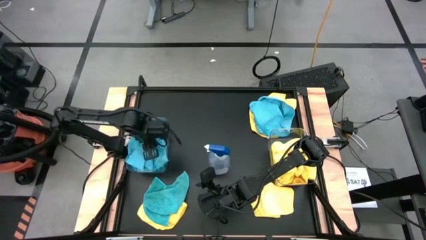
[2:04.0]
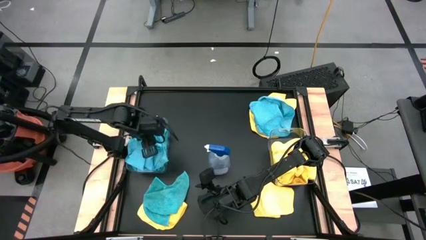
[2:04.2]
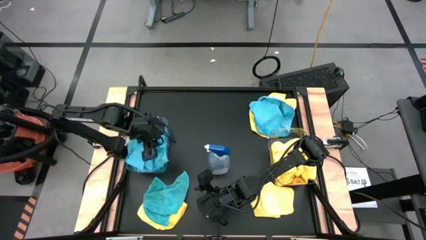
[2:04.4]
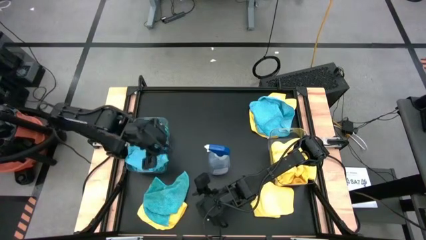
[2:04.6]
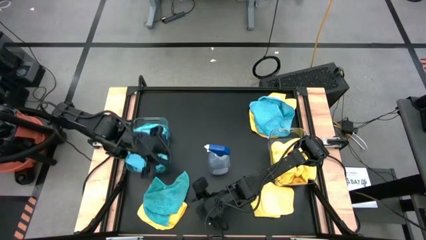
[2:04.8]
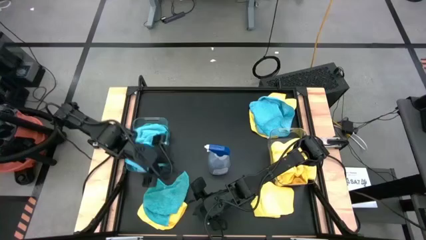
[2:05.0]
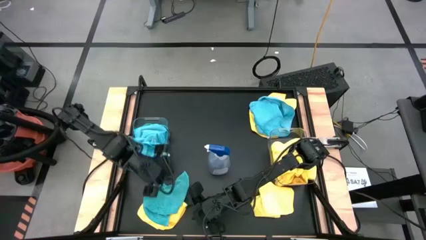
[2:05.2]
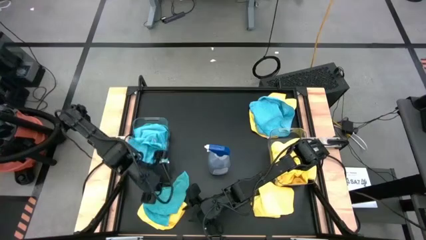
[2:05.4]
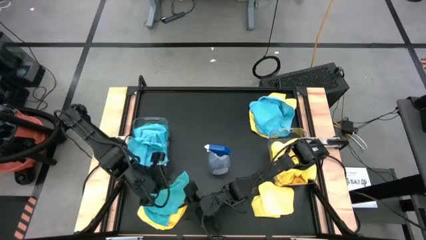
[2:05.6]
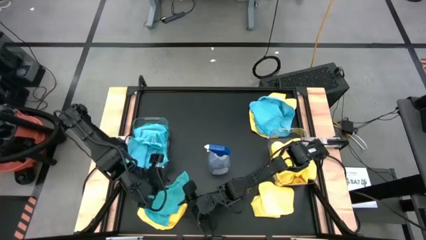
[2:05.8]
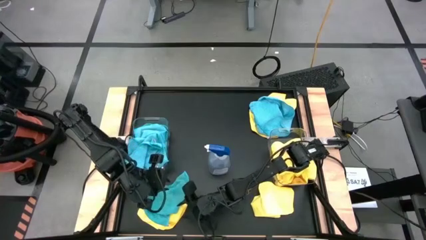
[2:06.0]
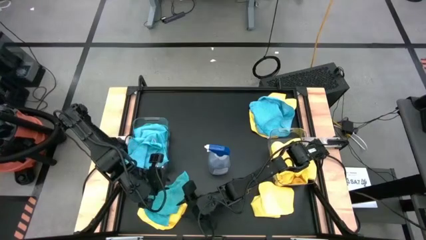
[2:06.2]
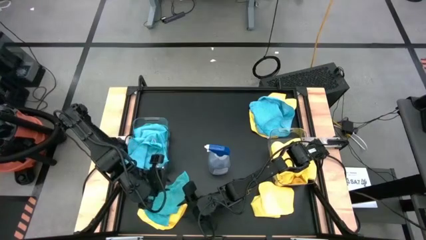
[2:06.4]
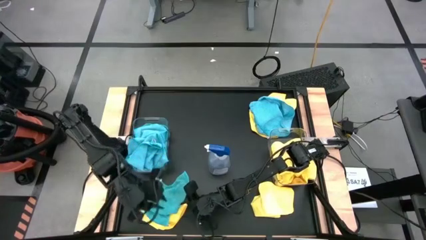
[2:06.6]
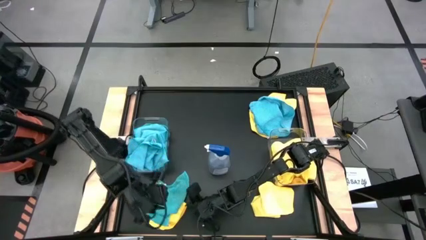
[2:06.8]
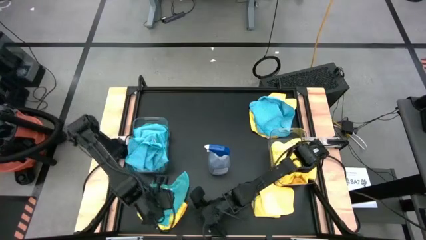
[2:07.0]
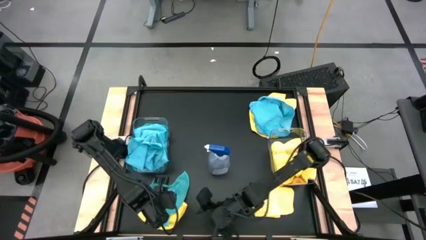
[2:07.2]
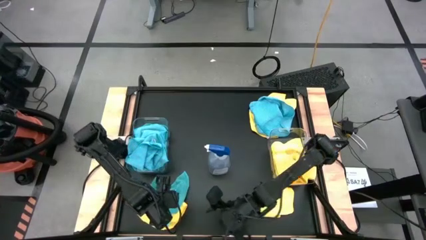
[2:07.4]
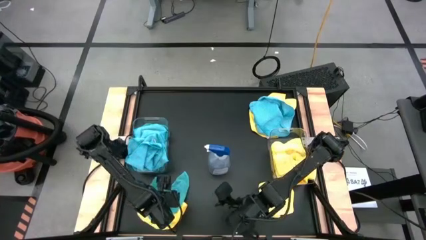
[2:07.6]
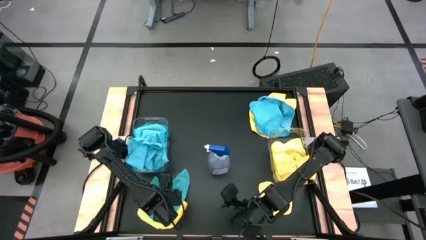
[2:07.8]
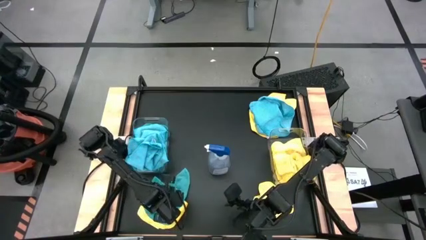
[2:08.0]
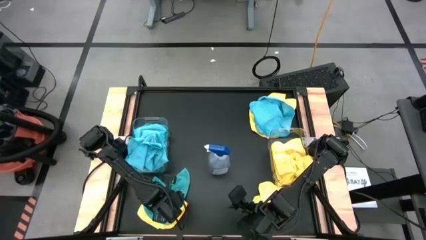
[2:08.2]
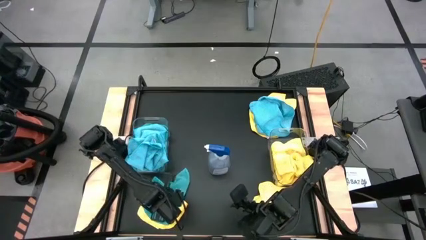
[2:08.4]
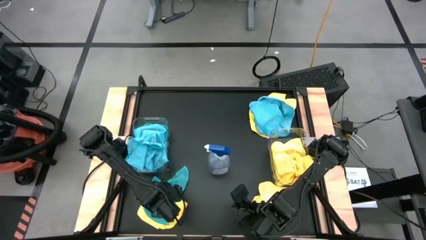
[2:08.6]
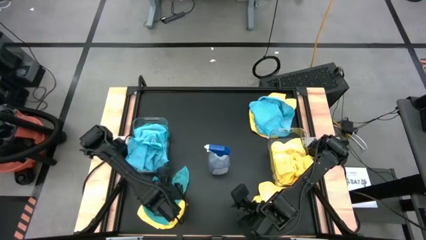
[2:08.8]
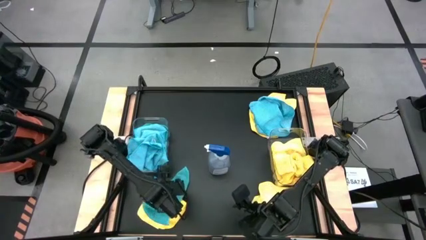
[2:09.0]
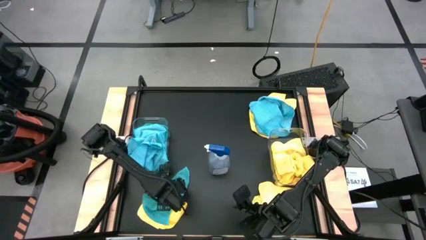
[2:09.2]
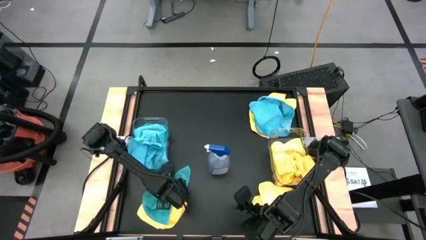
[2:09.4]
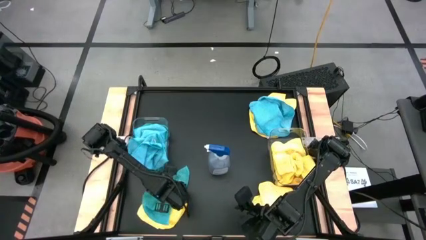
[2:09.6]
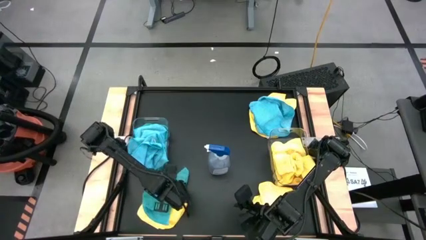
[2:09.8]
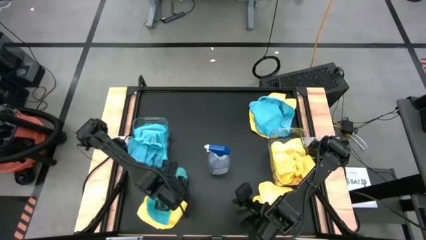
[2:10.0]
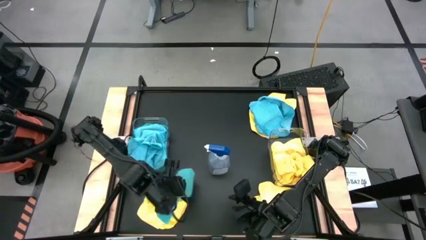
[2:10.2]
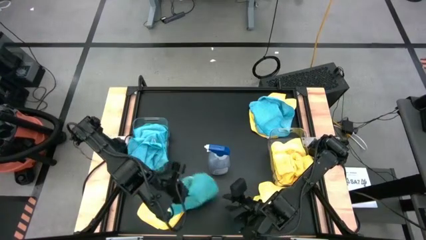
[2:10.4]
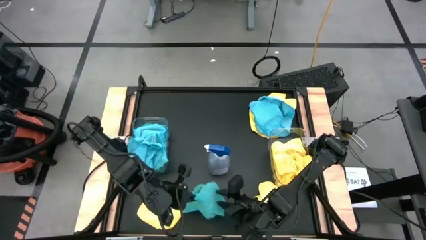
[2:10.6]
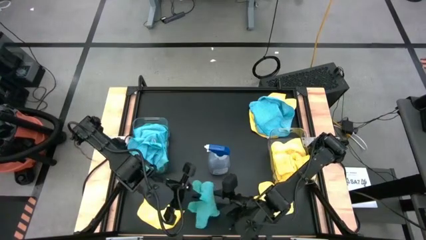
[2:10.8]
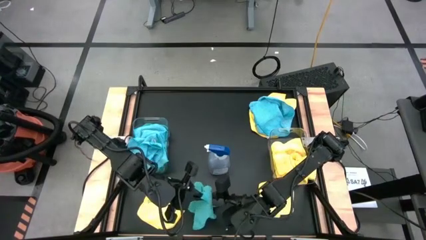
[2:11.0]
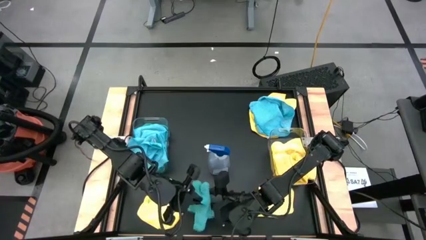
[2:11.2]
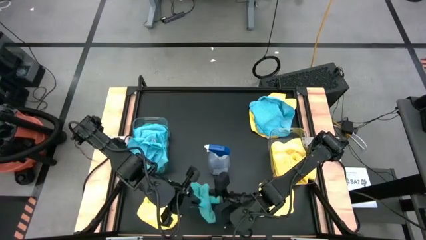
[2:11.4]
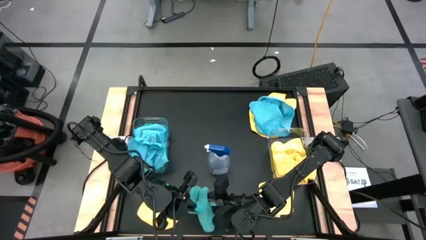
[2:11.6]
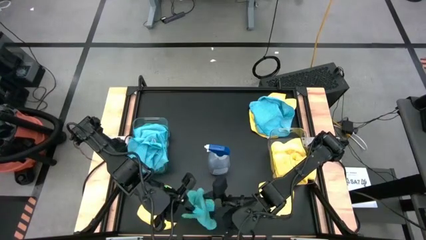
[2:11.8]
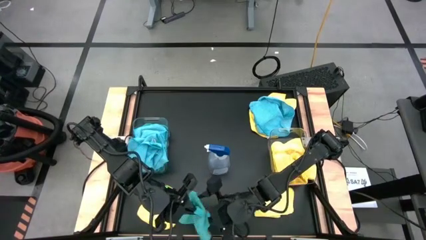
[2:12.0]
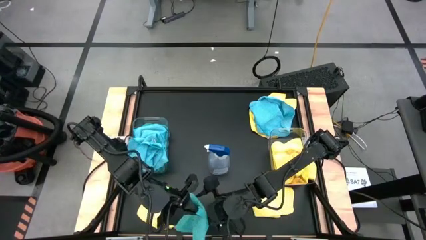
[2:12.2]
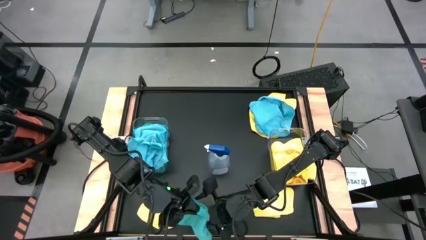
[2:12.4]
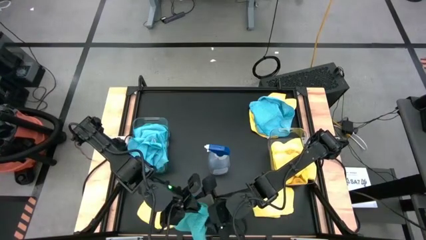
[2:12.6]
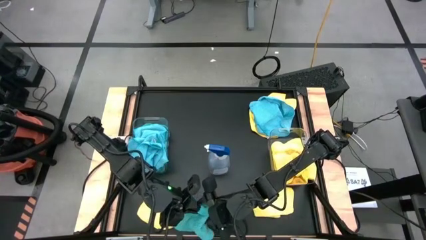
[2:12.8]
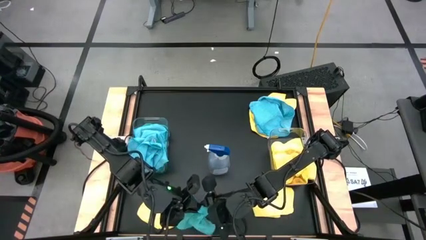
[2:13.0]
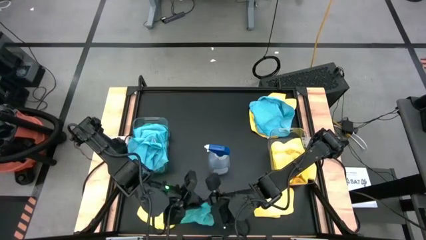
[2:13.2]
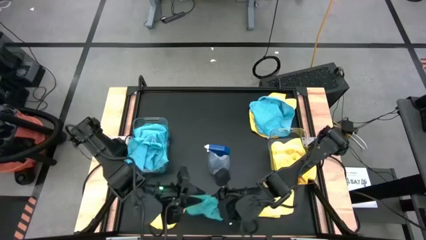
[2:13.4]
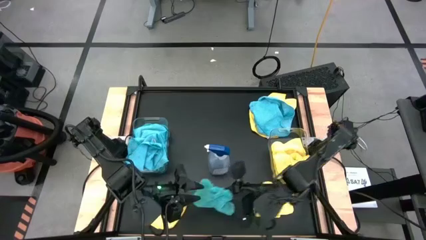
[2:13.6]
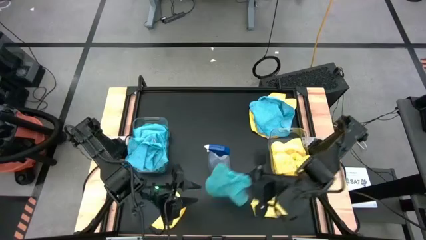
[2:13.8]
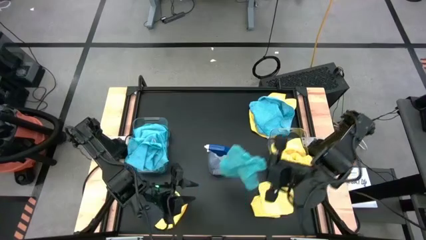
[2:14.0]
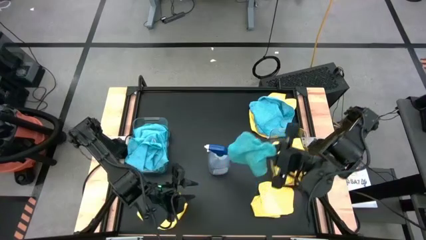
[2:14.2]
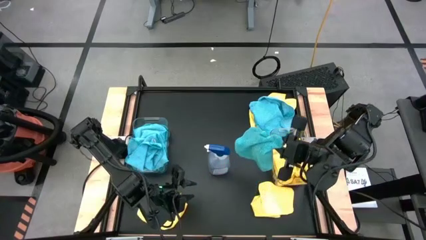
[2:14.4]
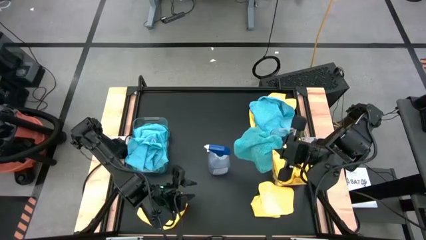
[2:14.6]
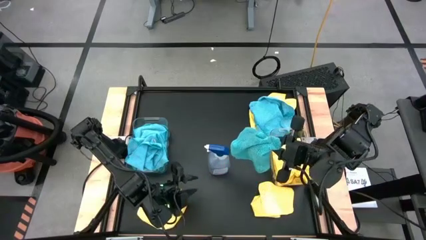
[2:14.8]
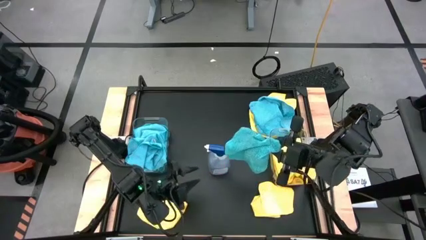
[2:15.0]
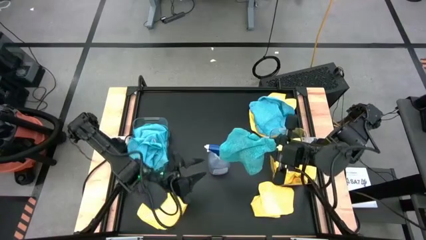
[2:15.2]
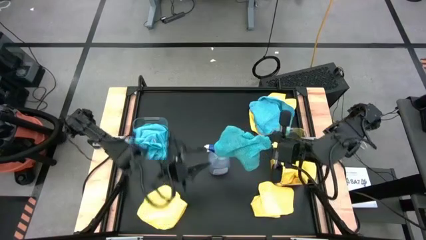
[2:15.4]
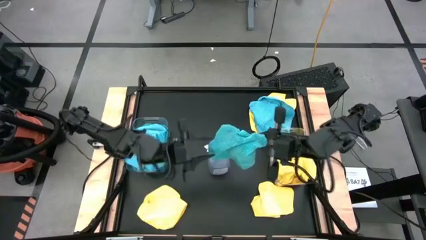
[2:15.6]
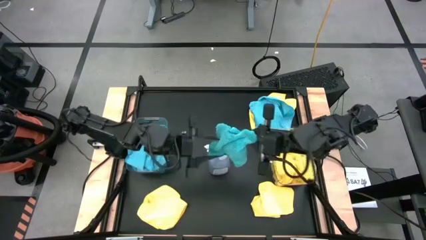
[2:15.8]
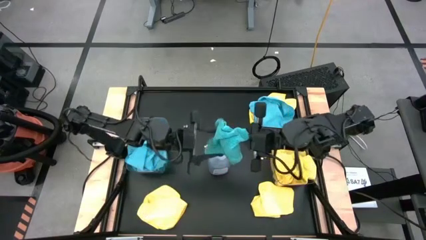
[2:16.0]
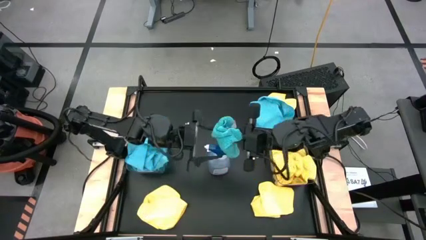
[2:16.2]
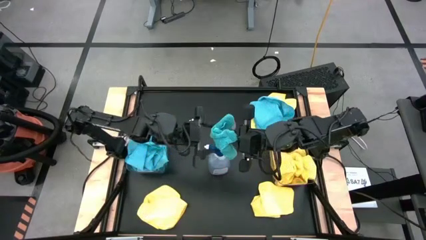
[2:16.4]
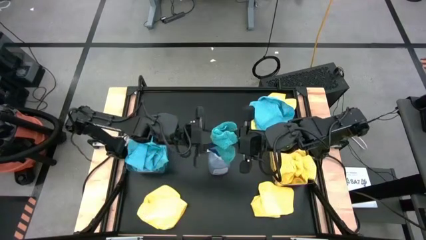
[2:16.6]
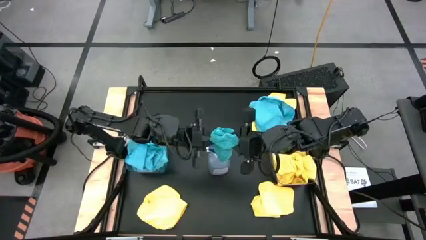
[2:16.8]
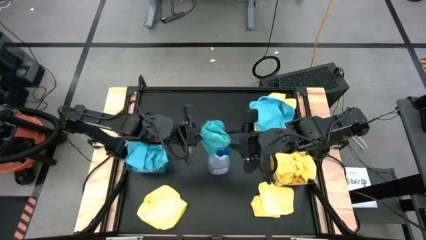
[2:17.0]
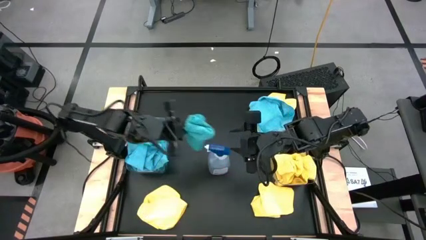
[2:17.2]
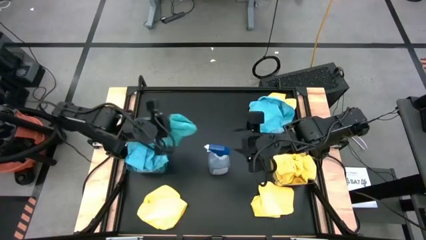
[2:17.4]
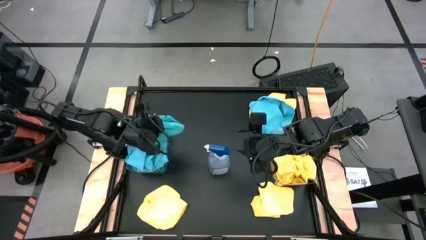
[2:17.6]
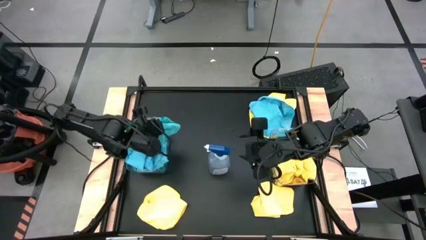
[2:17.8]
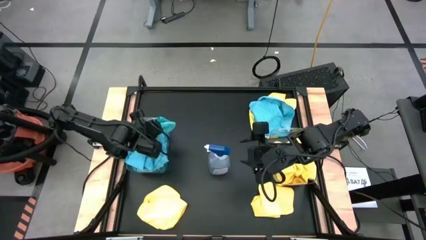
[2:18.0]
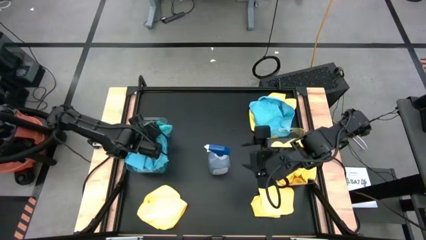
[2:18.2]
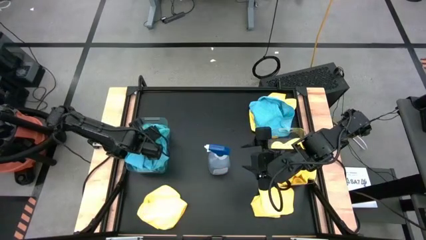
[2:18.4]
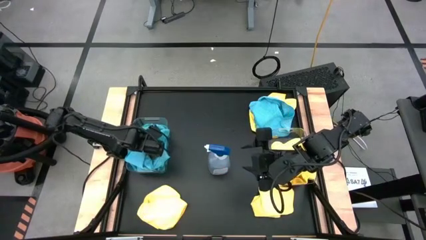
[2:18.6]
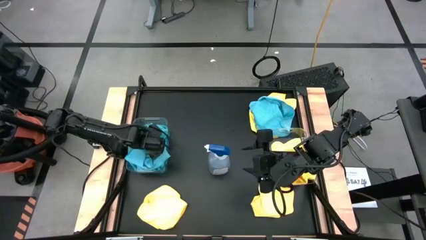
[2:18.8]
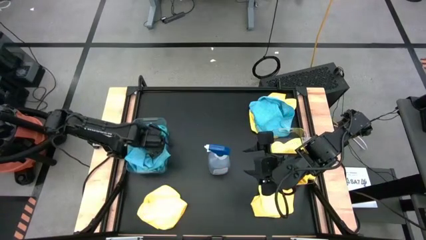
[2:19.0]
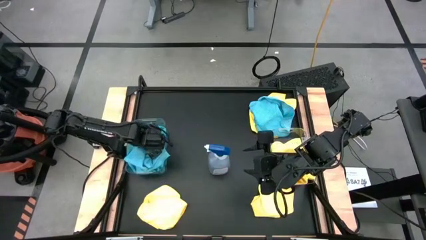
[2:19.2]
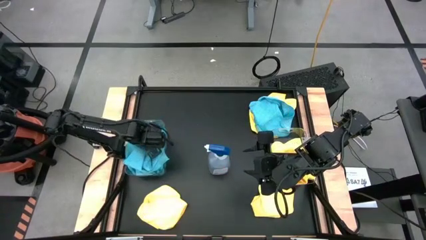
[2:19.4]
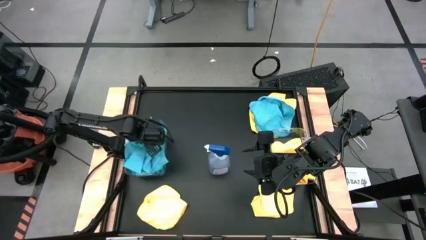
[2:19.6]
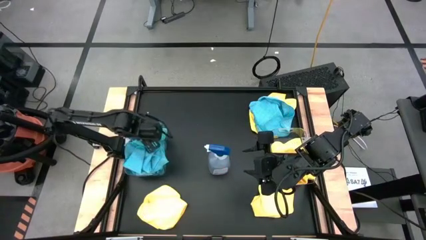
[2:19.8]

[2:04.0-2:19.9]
Task: Sort microfiber towel by color & place in baskets
Put the blue microfiber cloth into the left transparent bin

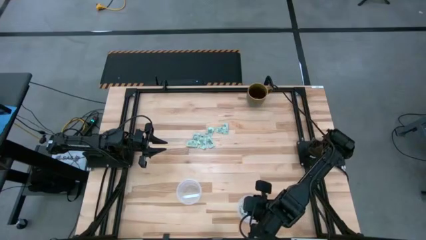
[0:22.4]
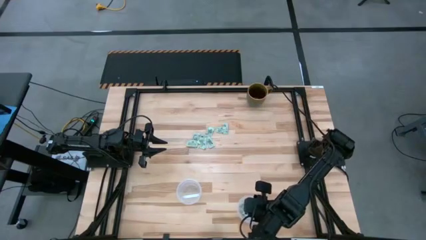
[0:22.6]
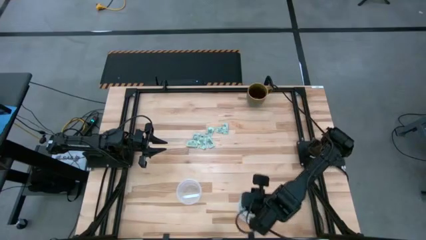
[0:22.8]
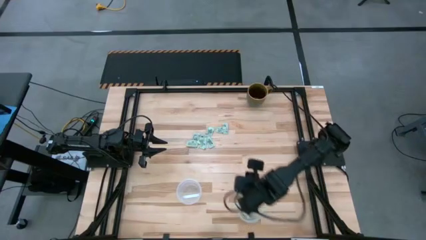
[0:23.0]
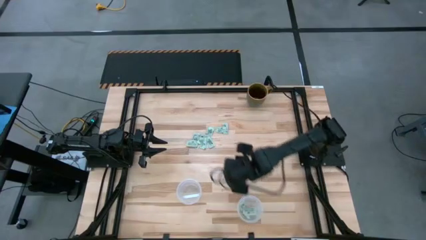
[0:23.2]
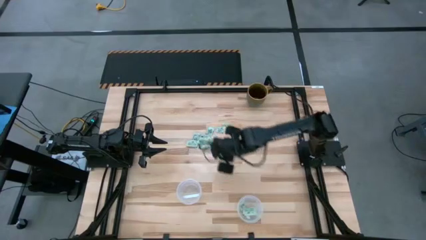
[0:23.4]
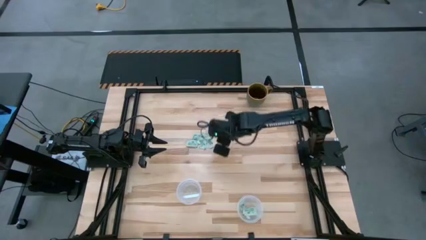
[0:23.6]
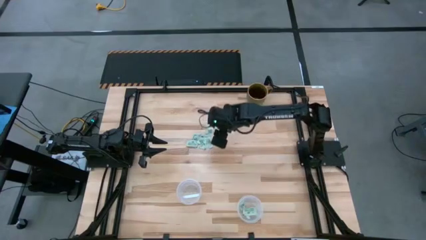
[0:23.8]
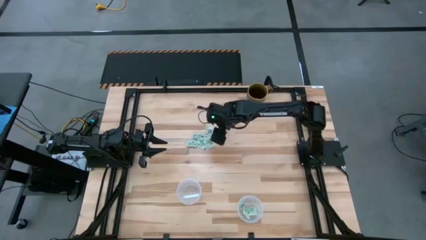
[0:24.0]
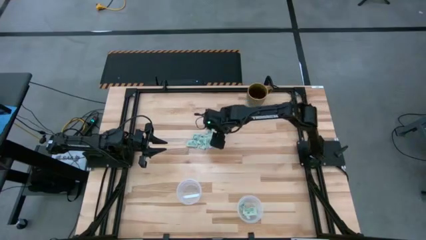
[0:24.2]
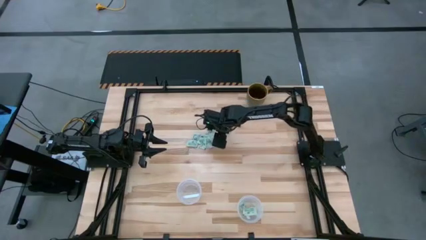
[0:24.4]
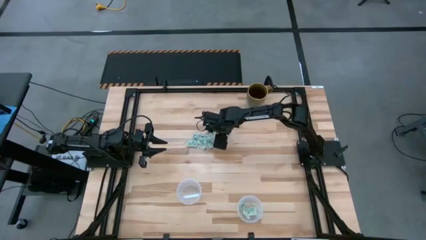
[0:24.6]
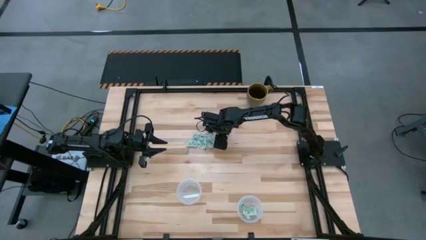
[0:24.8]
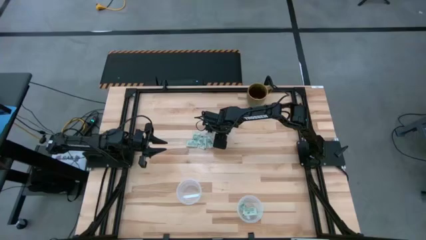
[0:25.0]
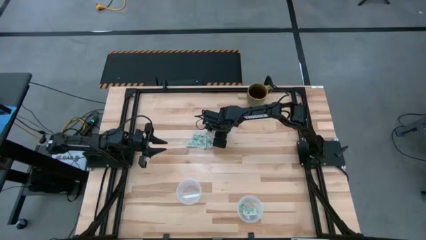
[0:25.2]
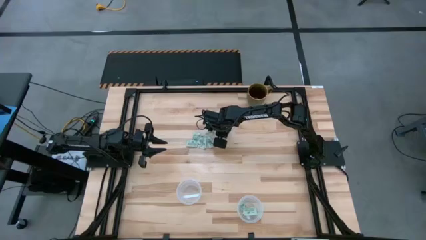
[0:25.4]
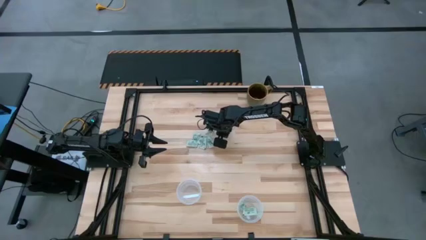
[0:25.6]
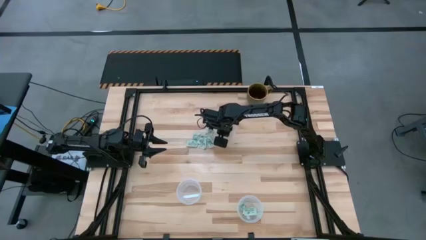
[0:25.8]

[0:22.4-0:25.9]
Task: Pick and place items into bin
Put the stevia packet into the right transparent bin
